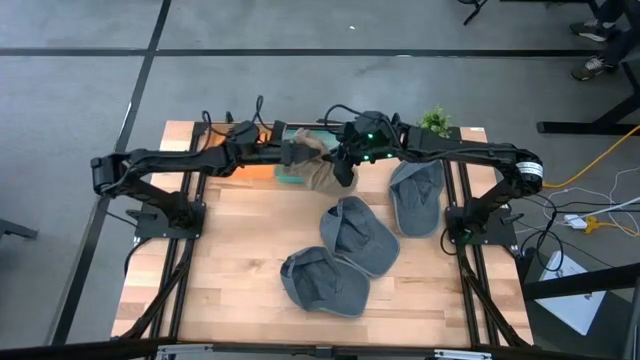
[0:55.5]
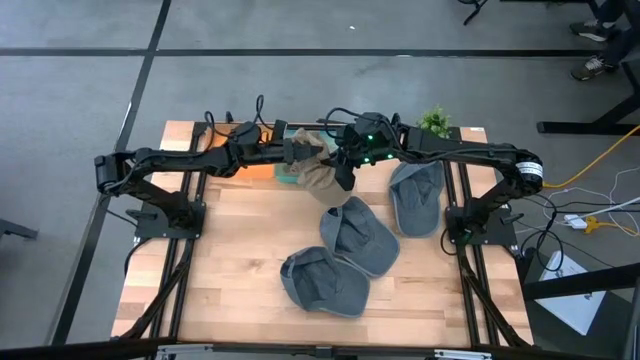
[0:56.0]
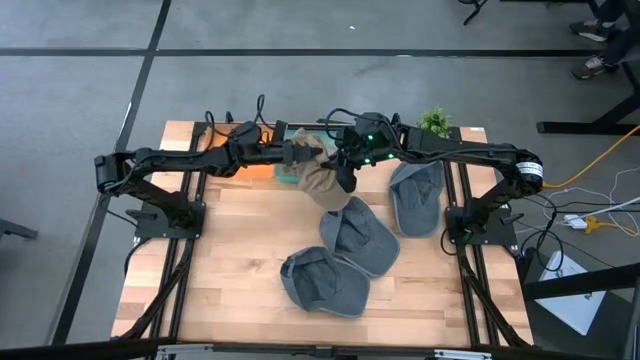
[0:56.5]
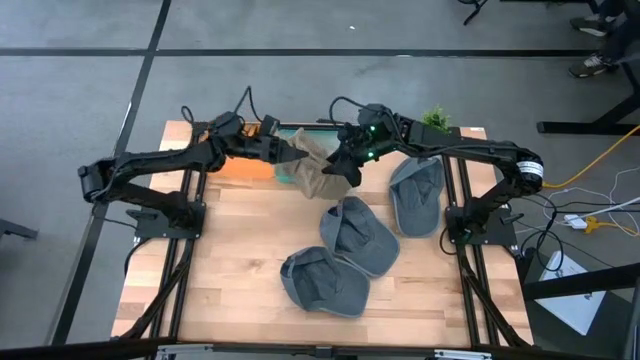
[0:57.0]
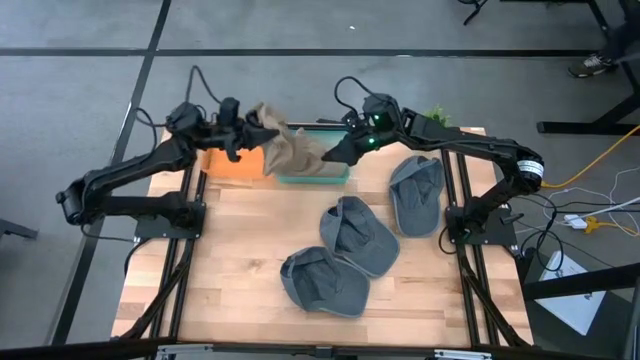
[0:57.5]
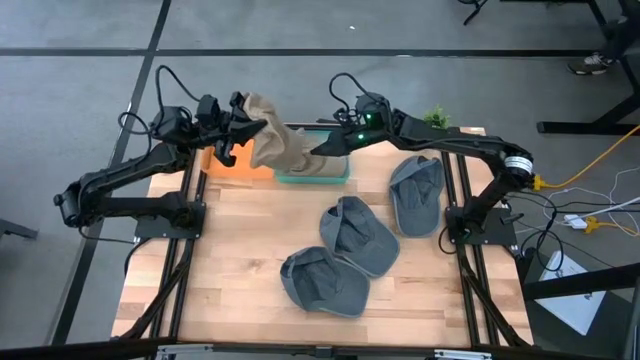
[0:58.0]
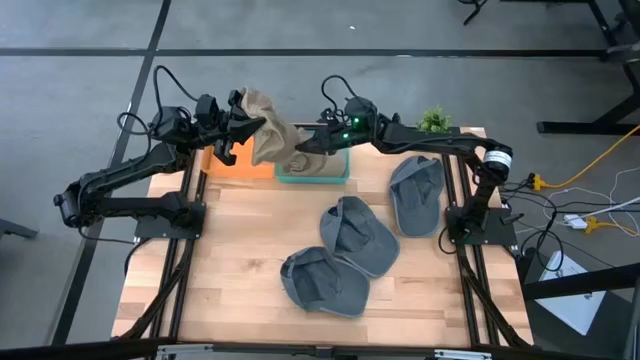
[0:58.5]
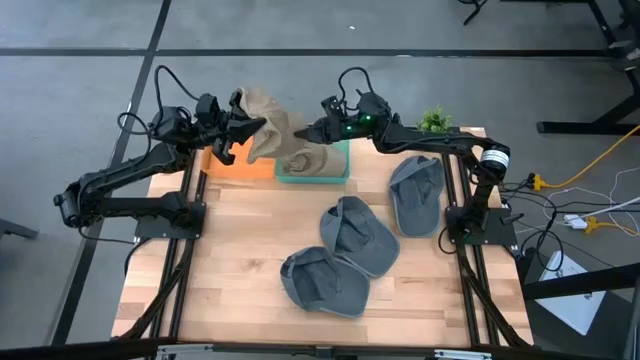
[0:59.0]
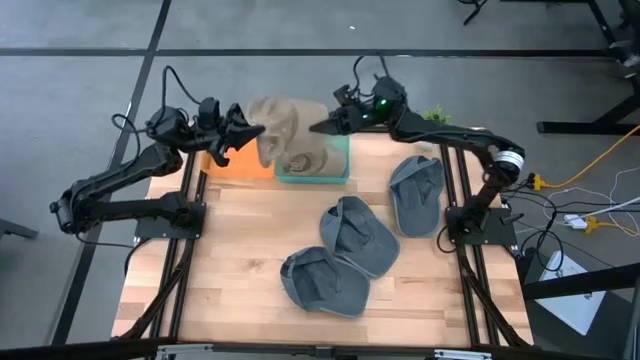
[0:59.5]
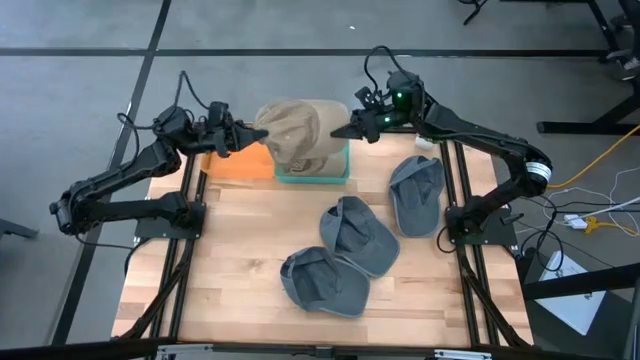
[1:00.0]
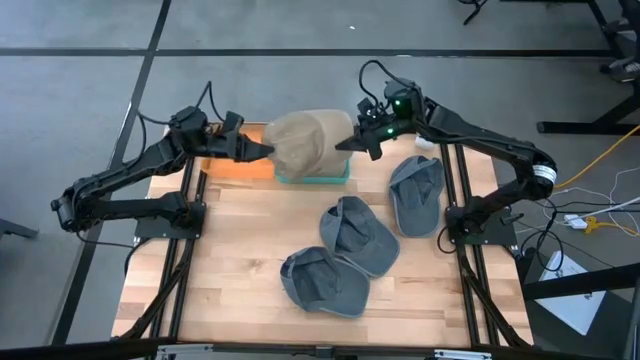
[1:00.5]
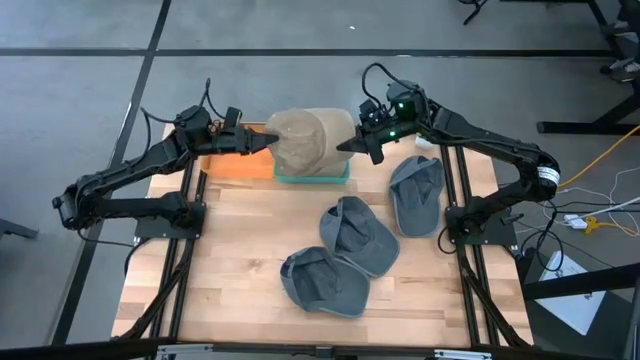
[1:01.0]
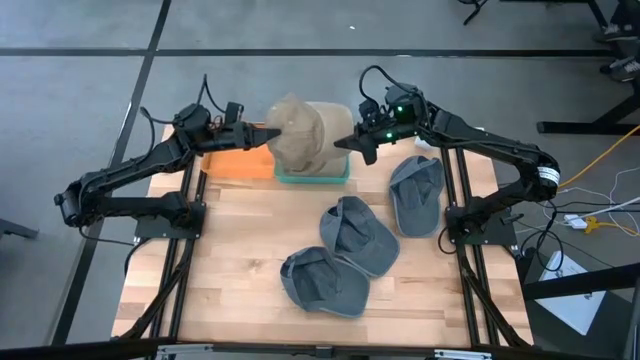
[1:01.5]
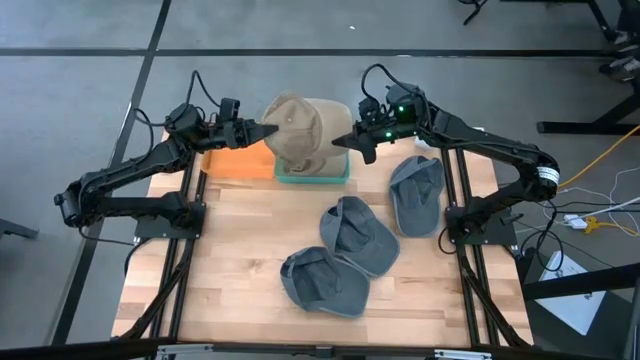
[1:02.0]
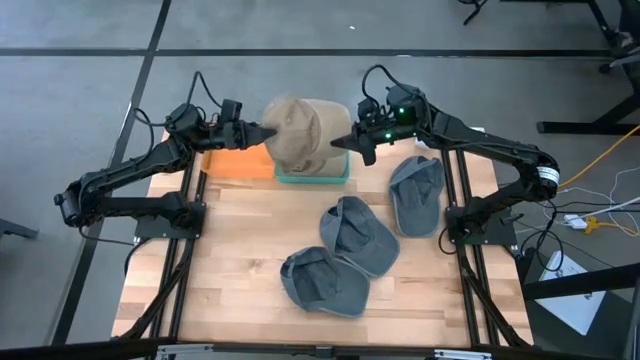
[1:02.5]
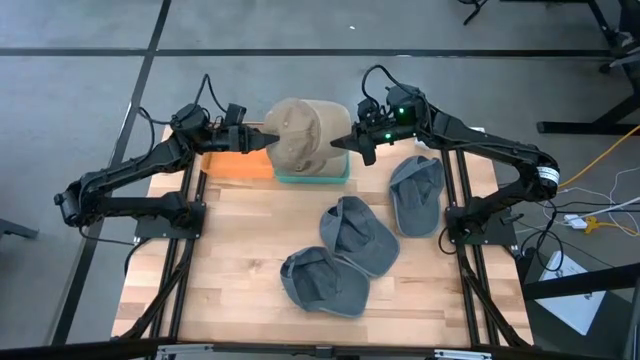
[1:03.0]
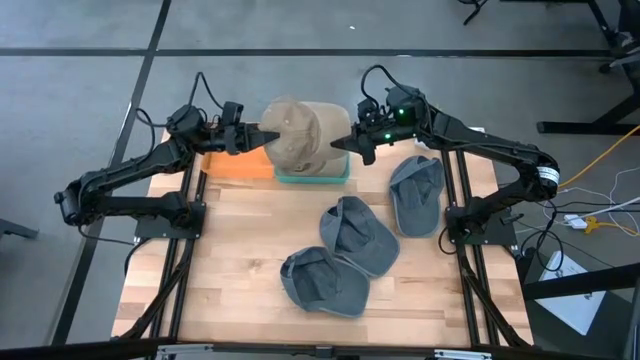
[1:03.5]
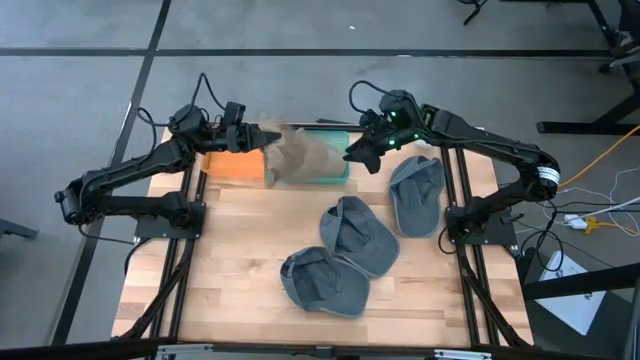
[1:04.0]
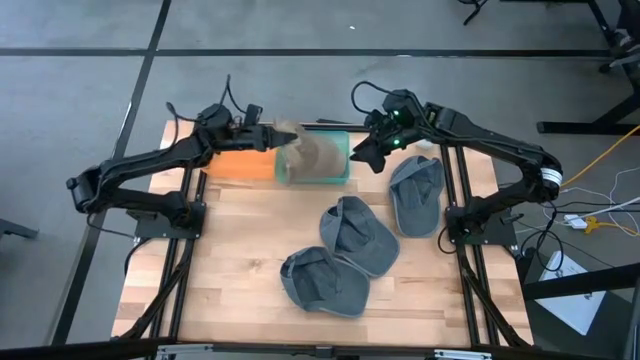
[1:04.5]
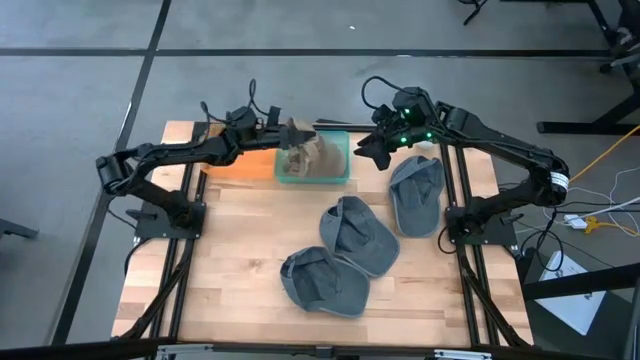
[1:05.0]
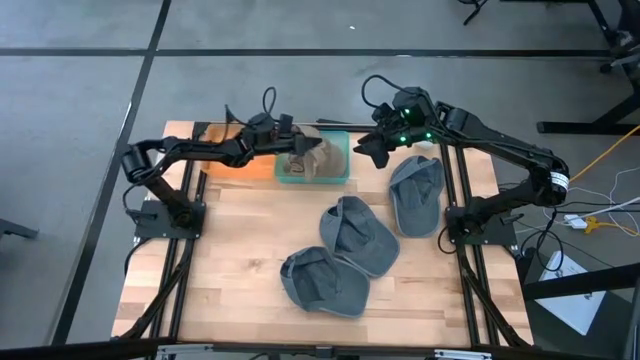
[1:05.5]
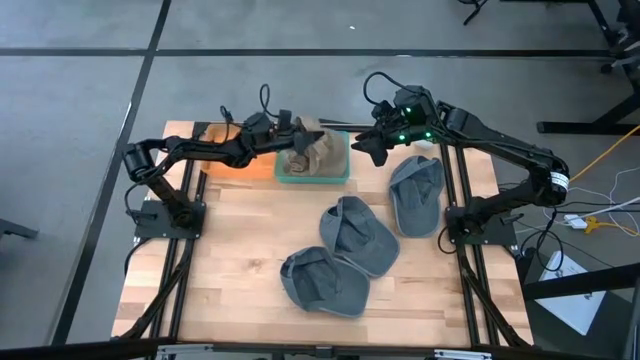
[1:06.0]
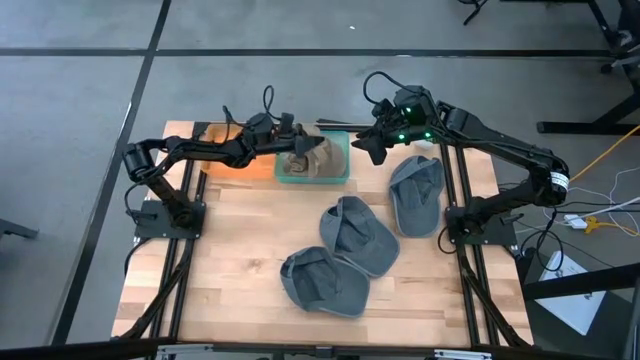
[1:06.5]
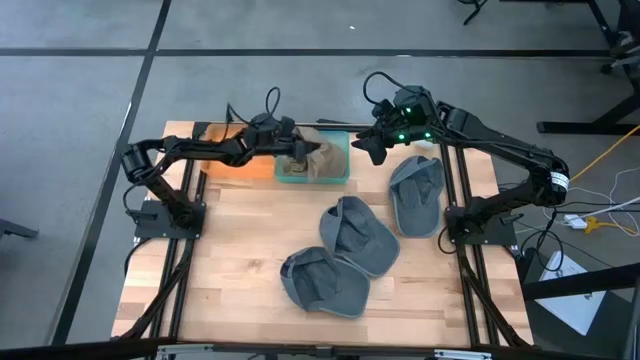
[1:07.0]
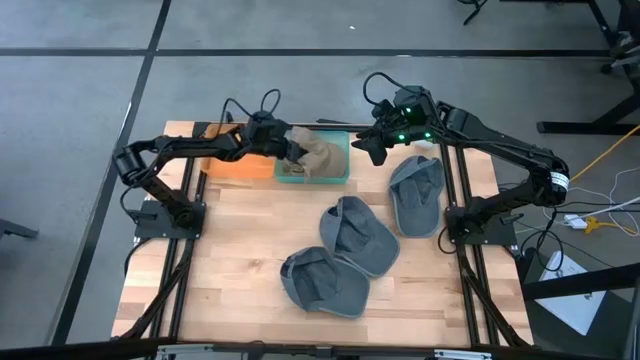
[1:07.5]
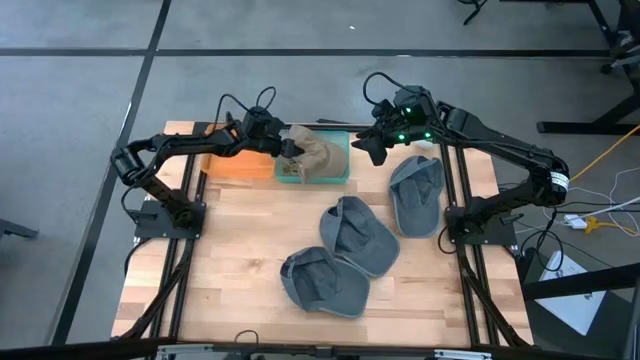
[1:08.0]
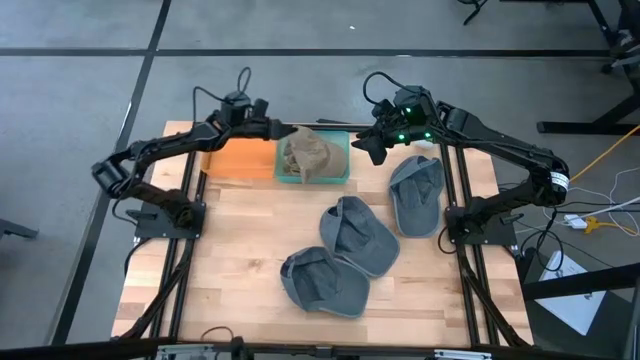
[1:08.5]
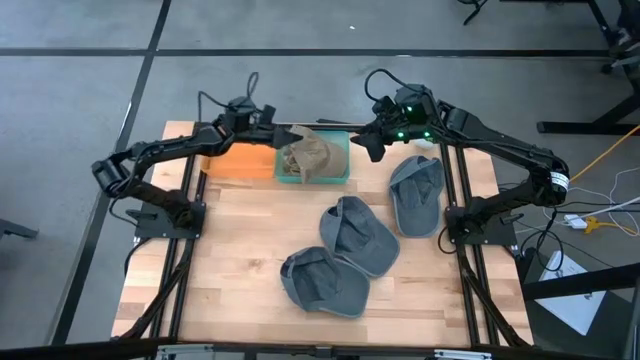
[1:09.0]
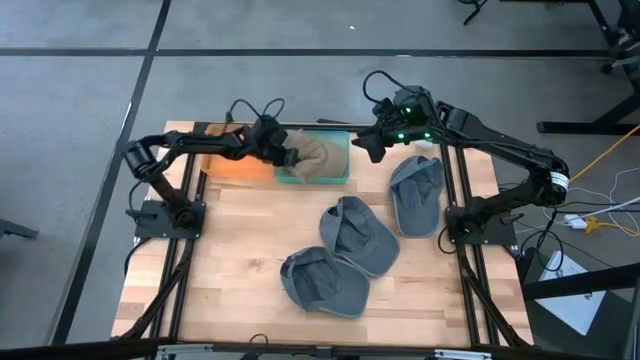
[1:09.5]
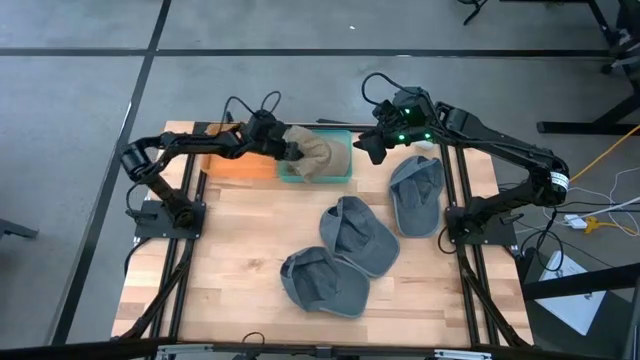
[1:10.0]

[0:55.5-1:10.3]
Task: Pick & Place hat
Put the brown cap into the green bin

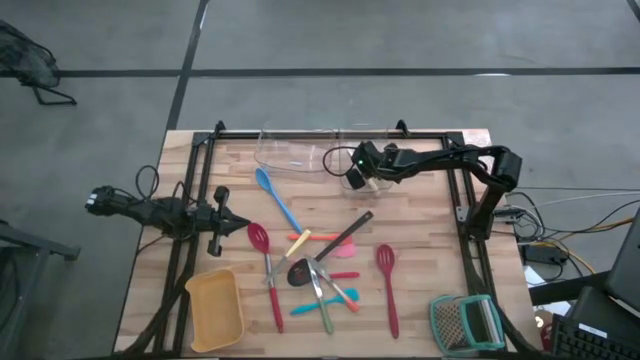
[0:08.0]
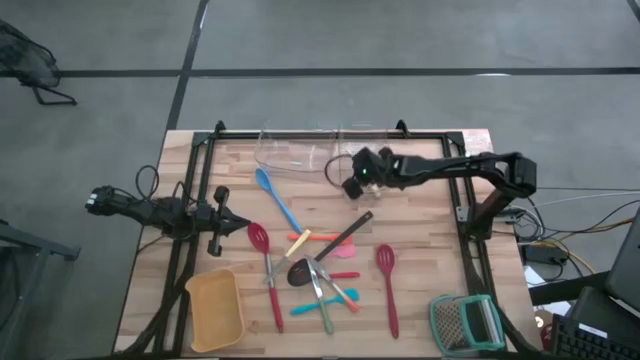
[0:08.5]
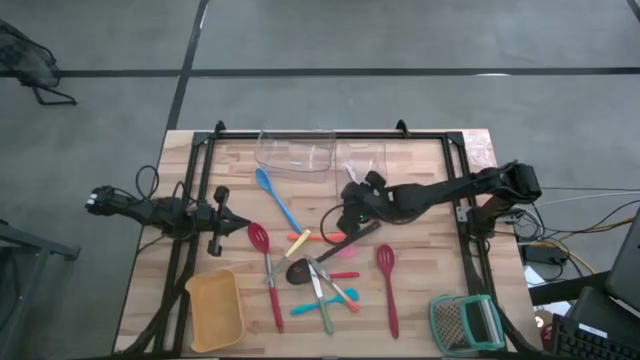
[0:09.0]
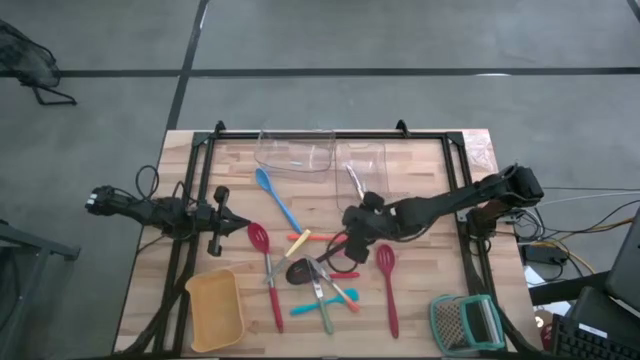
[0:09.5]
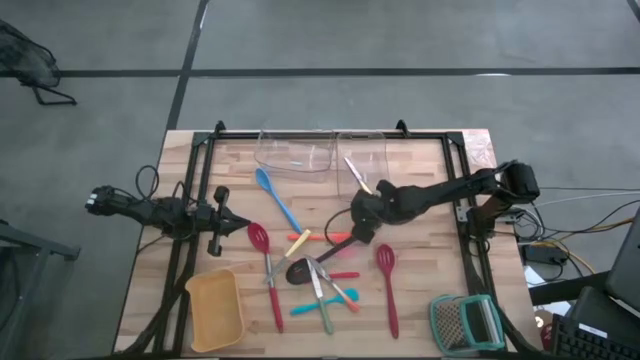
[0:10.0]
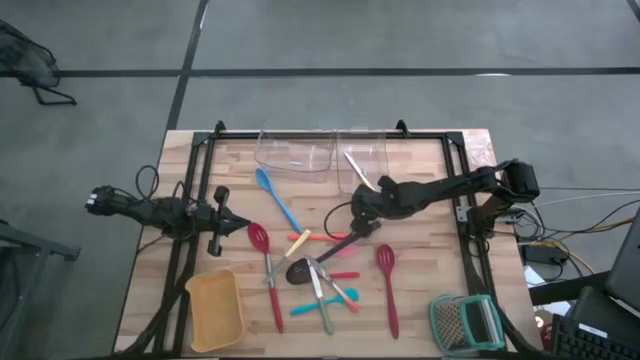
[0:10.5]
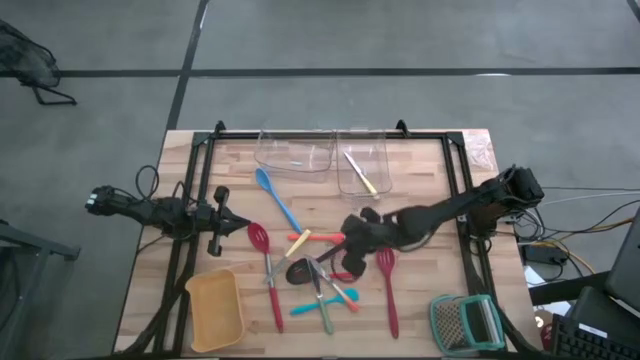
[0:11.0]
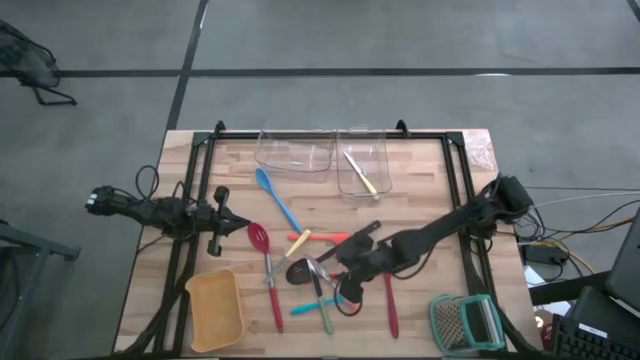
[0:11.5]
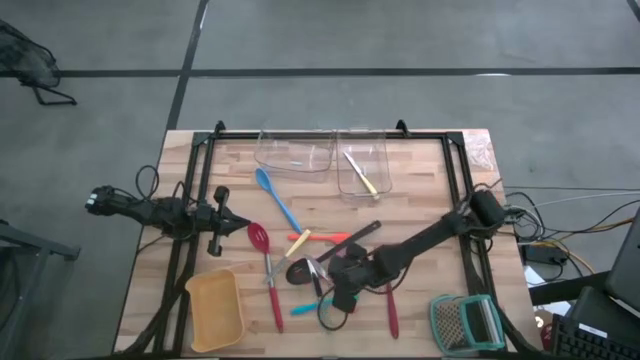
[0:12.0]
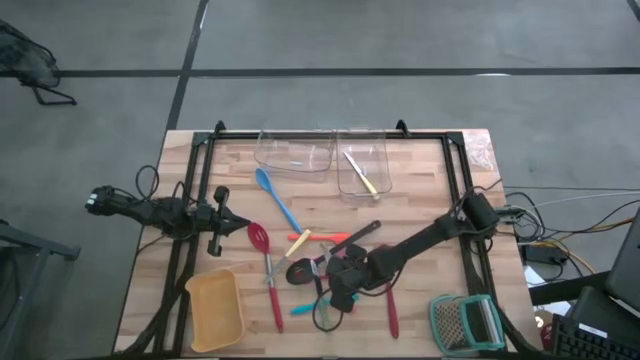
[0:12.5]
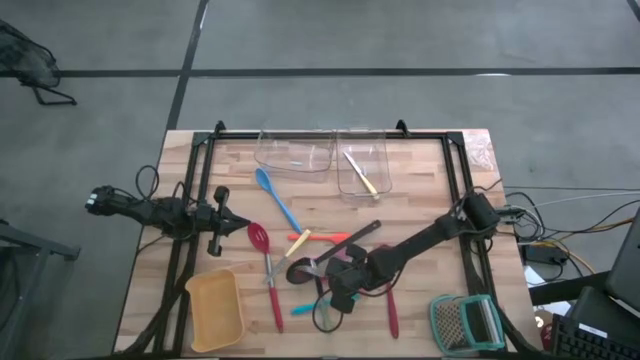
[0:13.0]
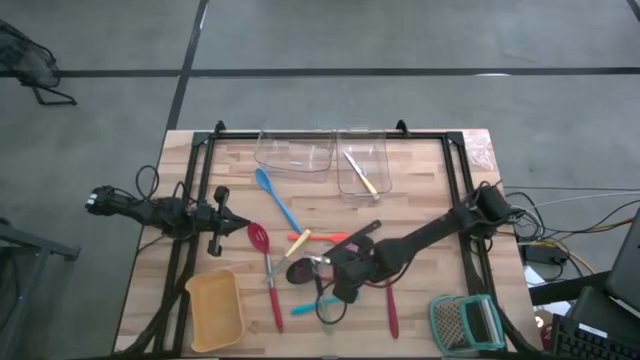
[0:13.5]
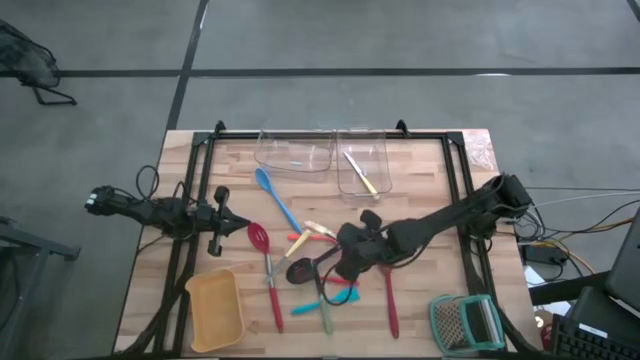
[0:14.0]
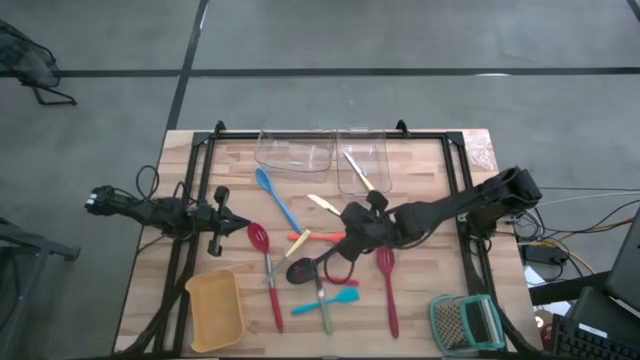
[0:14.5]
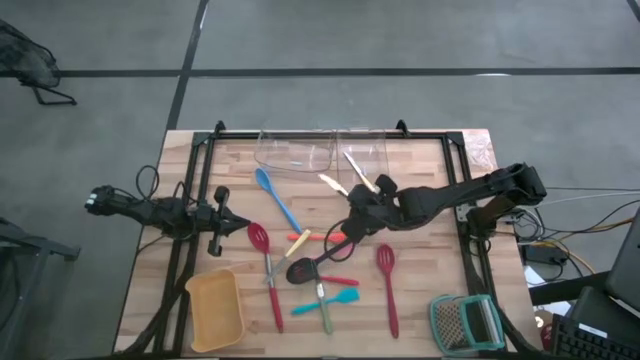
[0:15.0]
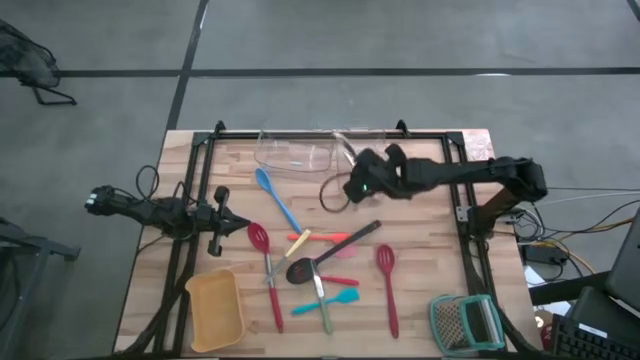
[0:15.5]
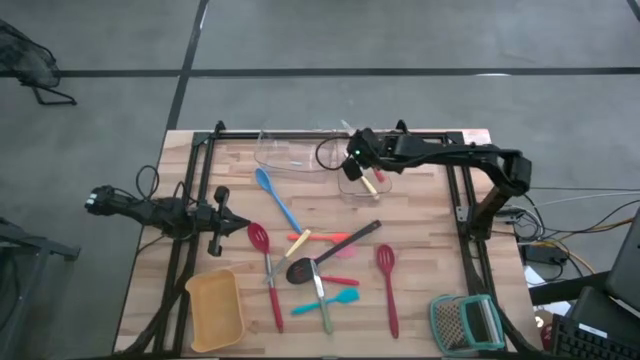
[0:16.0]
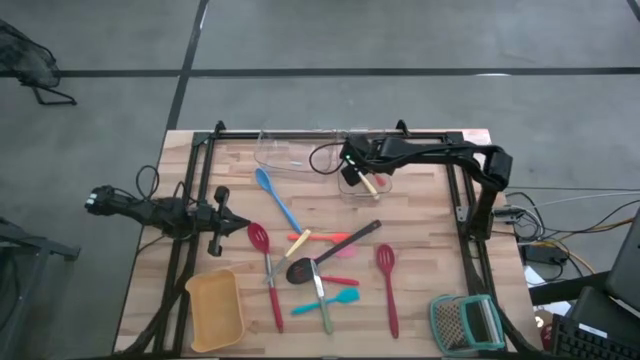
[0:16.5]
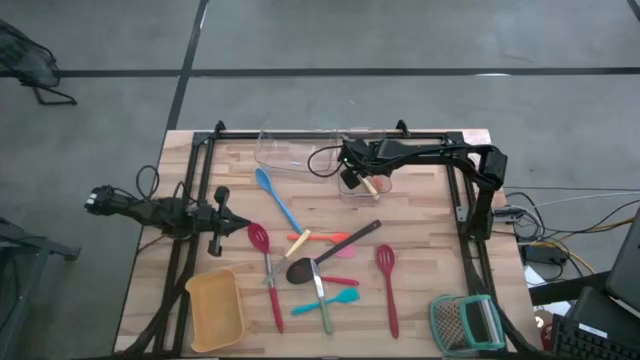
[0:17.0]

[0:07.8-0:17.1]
Task: Pick & Place Kitchen Items
Put the orange knife into the right transparent bin
